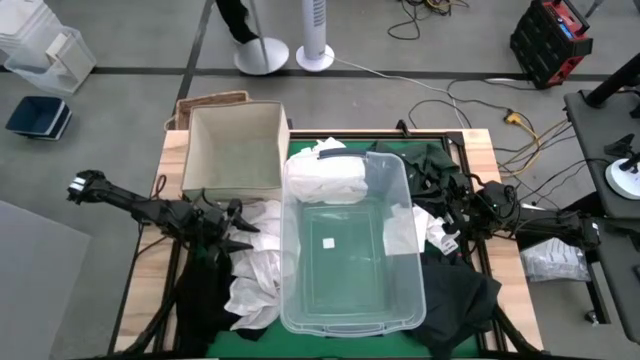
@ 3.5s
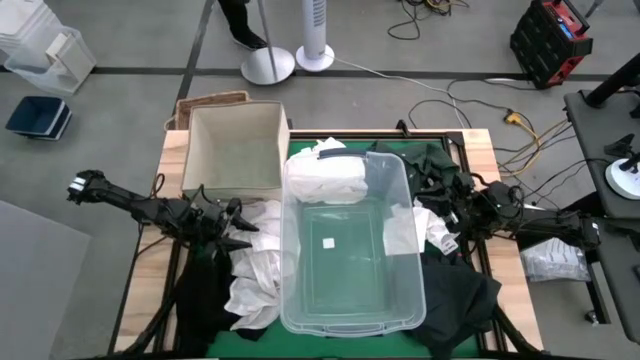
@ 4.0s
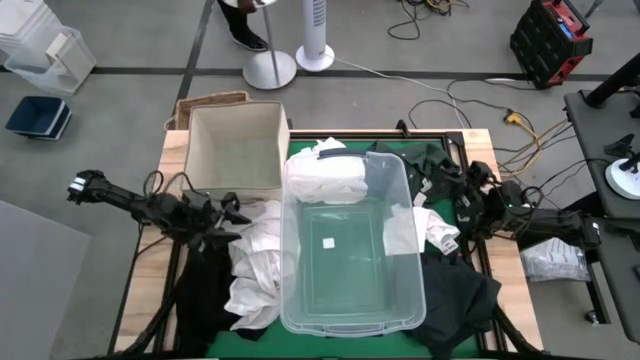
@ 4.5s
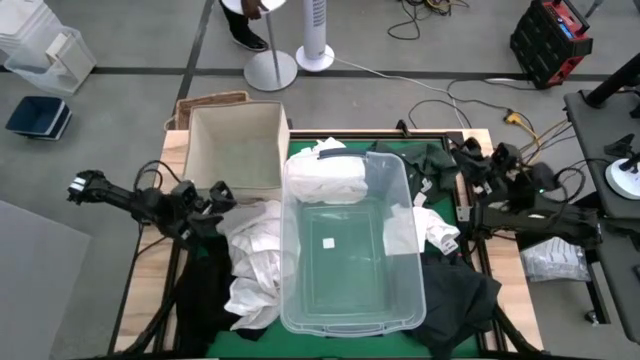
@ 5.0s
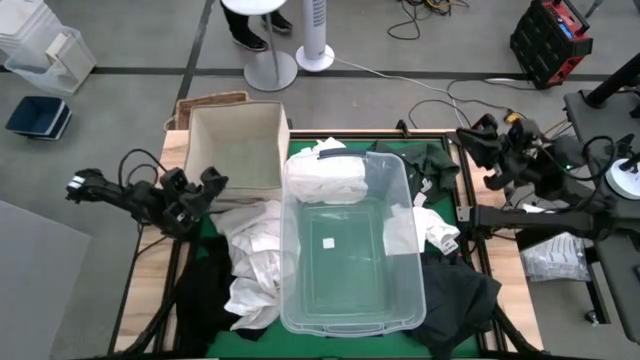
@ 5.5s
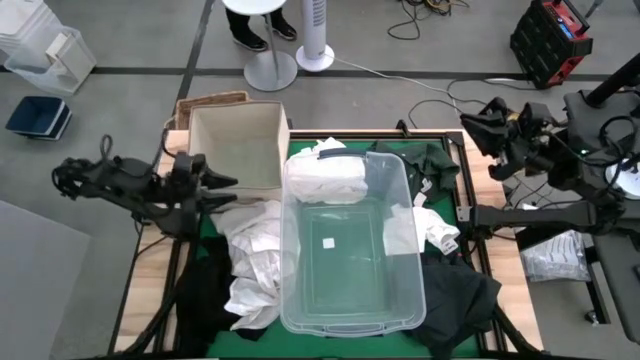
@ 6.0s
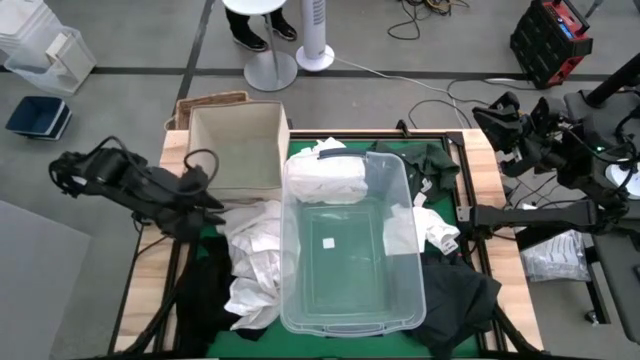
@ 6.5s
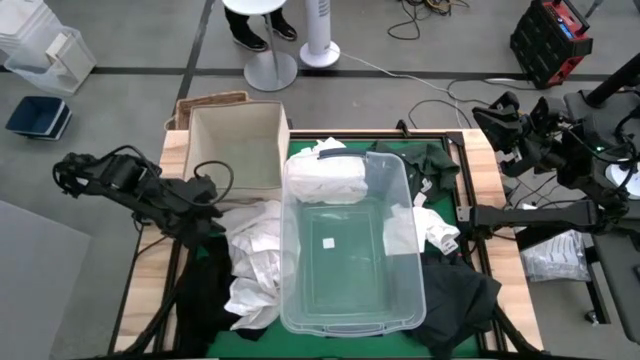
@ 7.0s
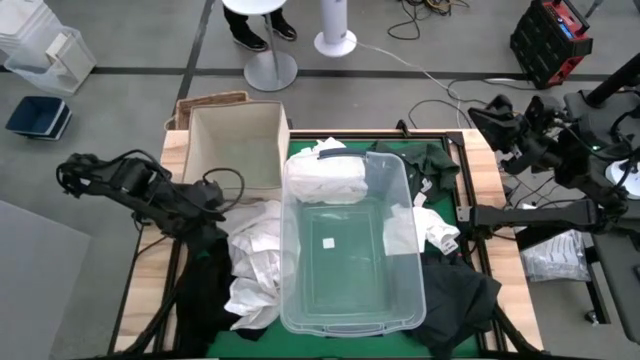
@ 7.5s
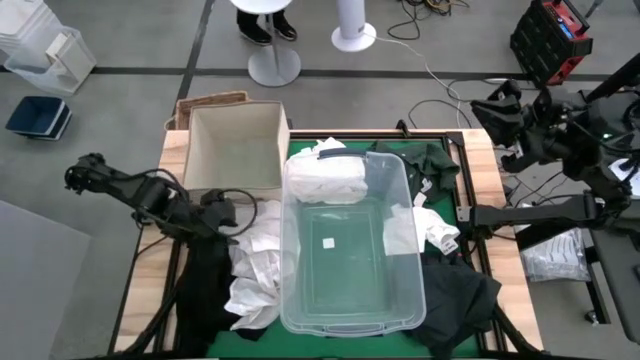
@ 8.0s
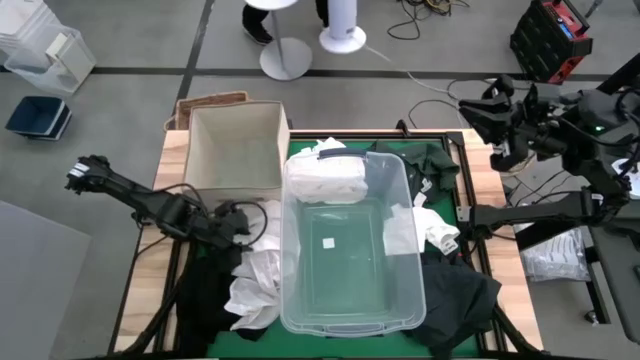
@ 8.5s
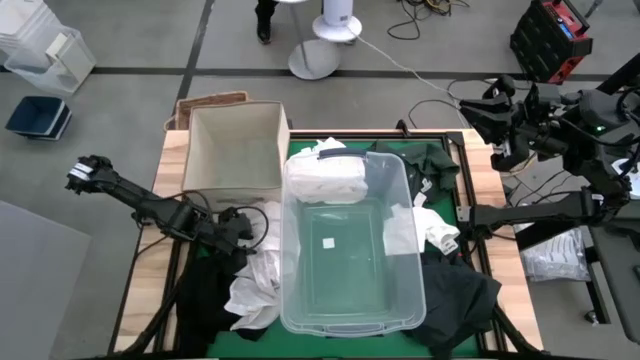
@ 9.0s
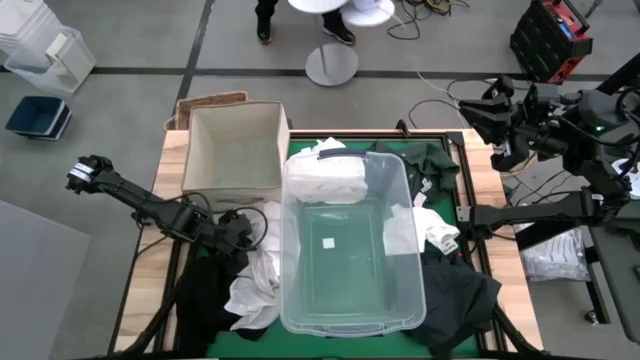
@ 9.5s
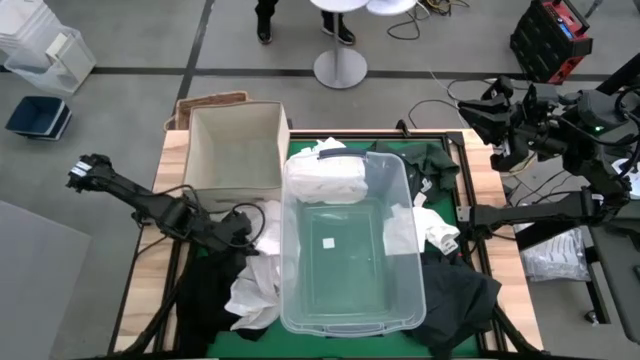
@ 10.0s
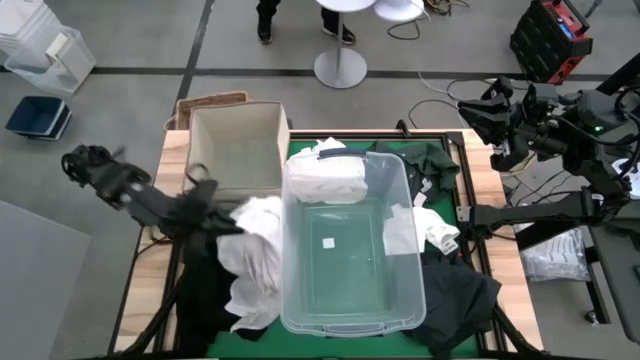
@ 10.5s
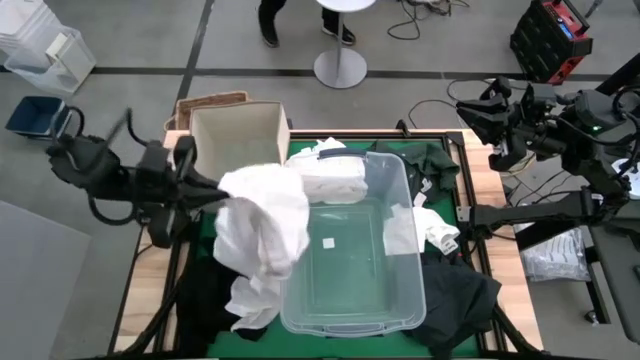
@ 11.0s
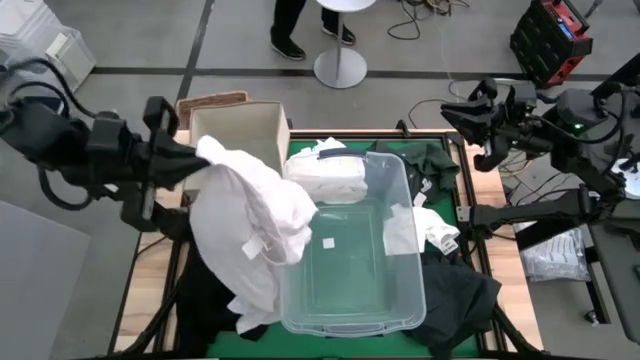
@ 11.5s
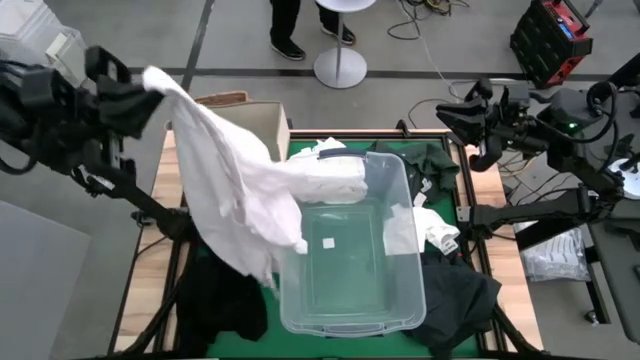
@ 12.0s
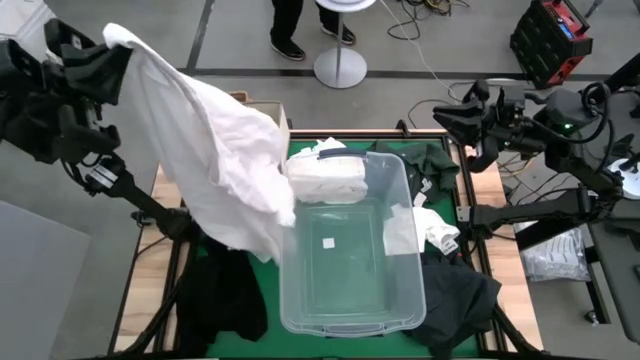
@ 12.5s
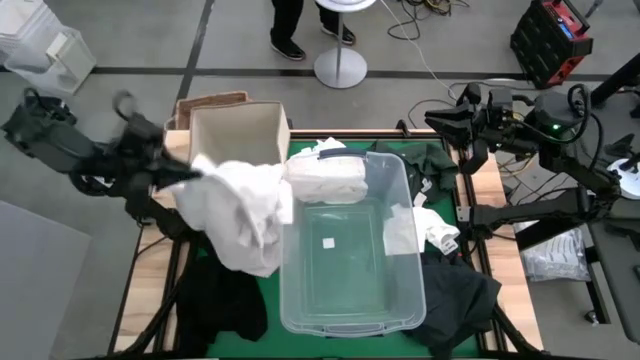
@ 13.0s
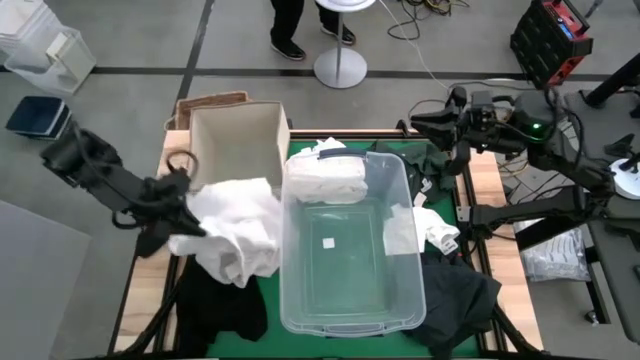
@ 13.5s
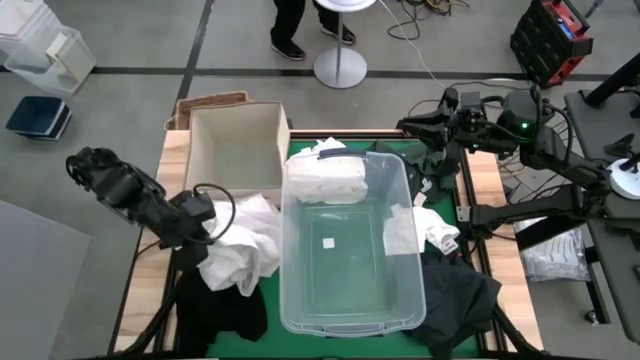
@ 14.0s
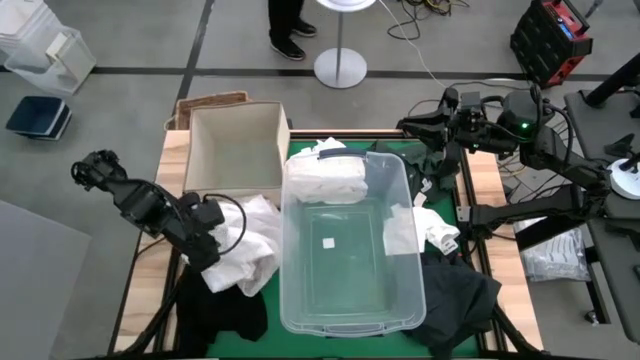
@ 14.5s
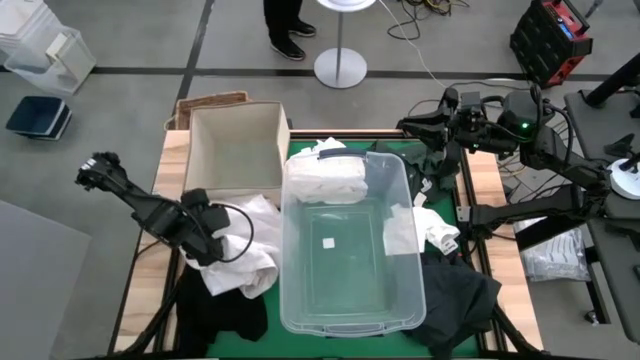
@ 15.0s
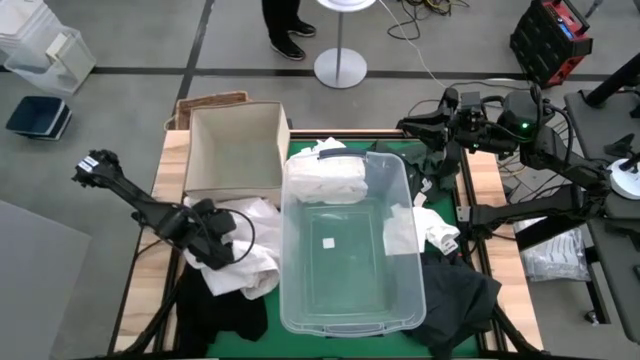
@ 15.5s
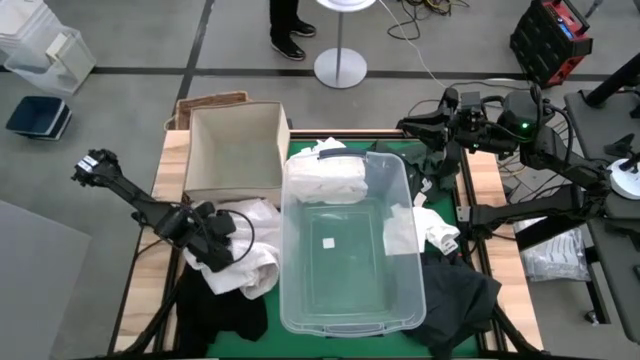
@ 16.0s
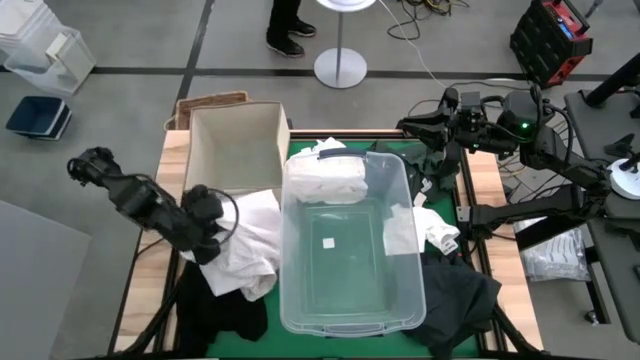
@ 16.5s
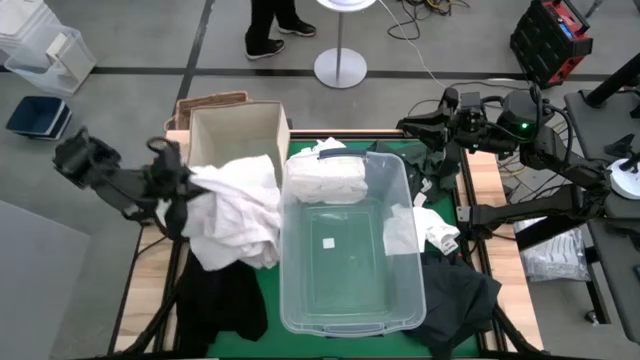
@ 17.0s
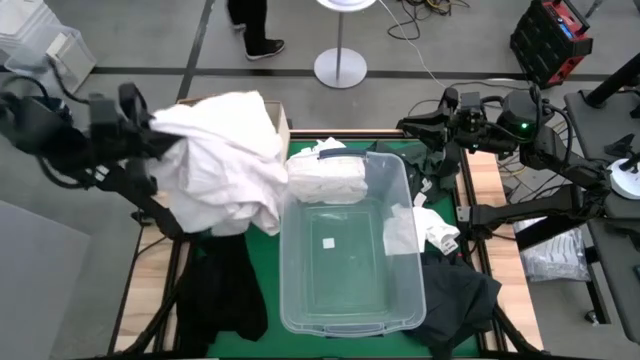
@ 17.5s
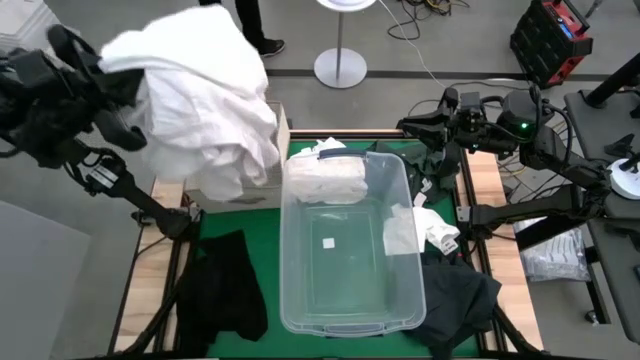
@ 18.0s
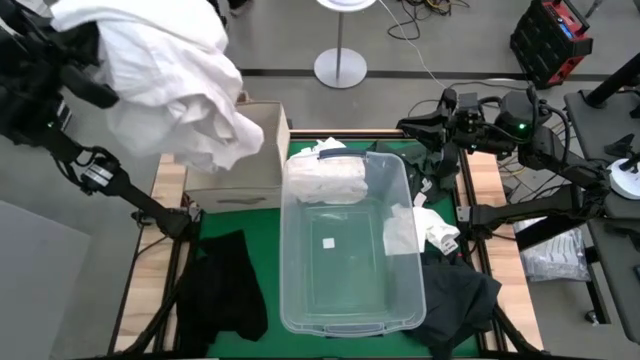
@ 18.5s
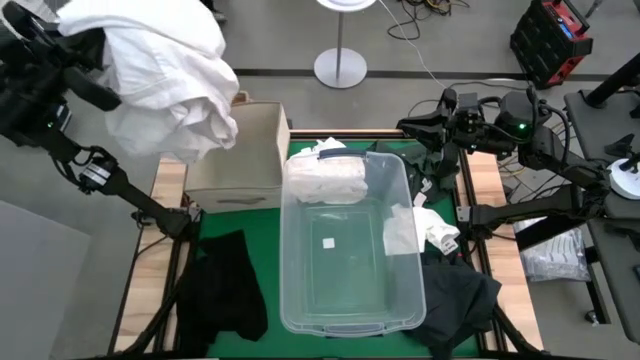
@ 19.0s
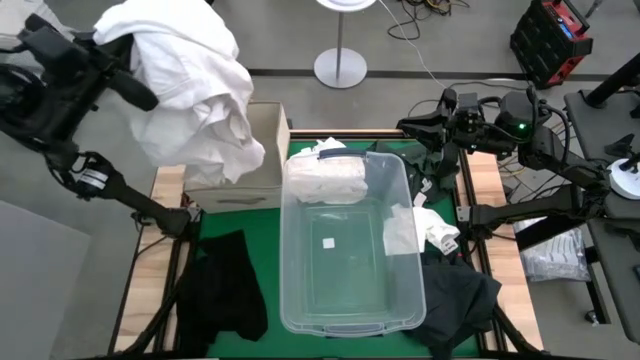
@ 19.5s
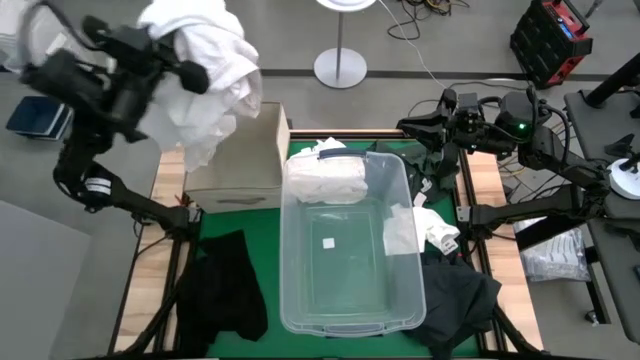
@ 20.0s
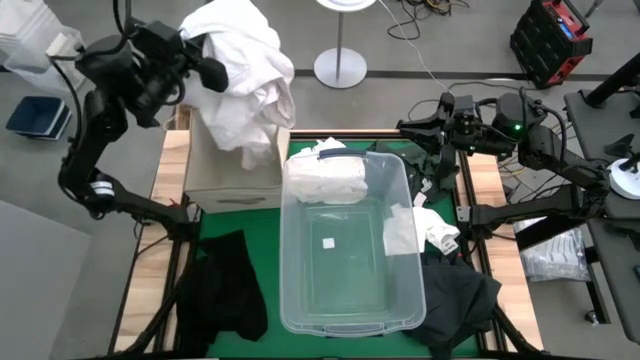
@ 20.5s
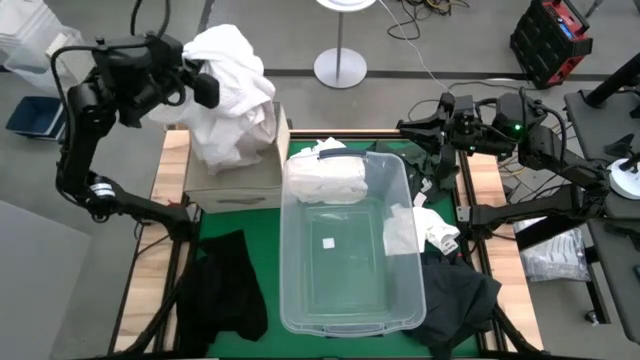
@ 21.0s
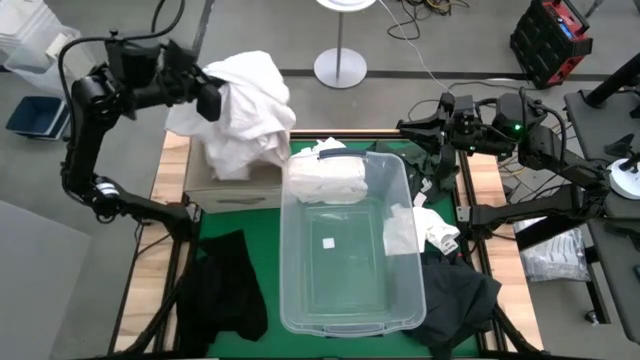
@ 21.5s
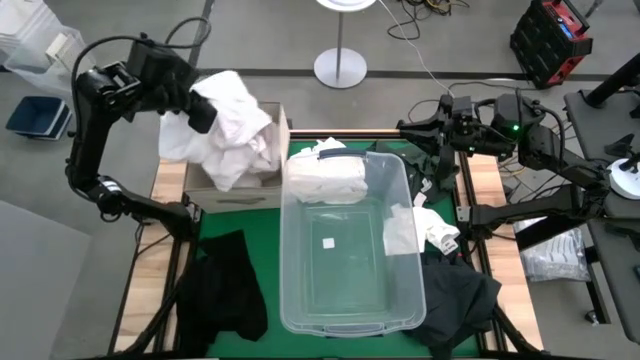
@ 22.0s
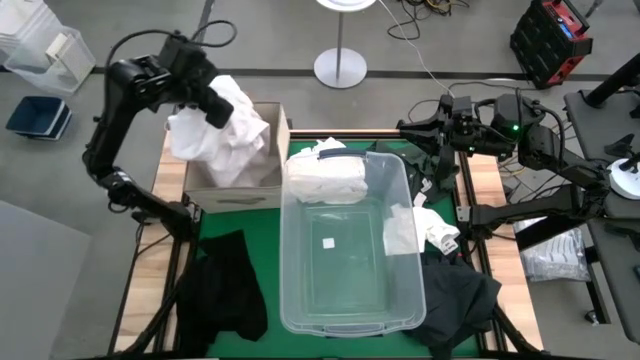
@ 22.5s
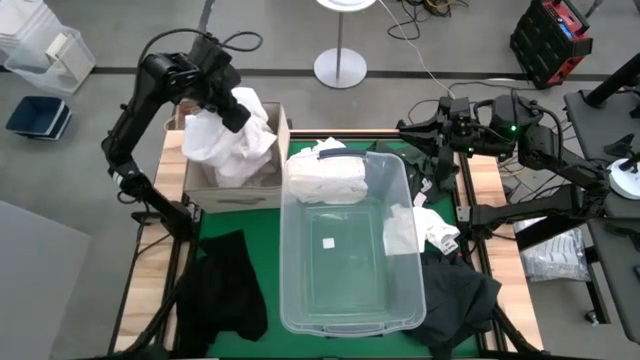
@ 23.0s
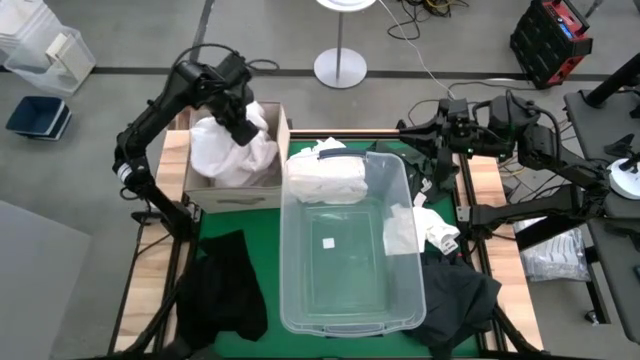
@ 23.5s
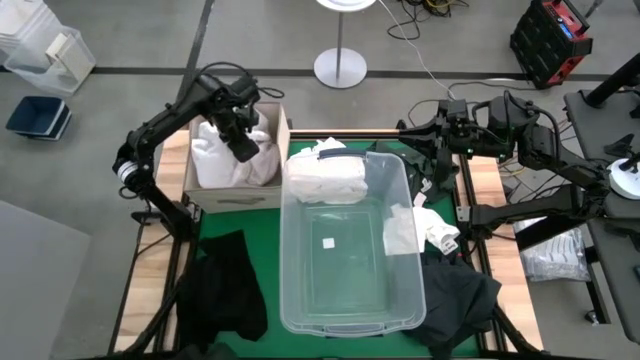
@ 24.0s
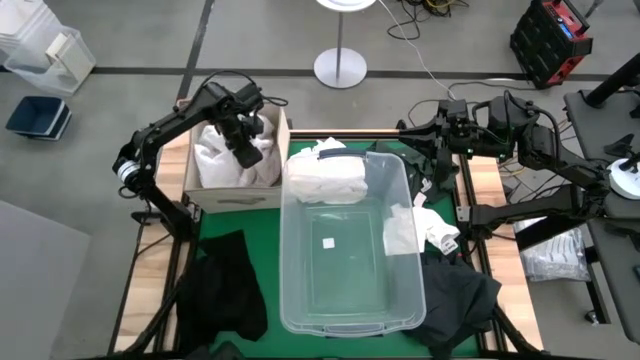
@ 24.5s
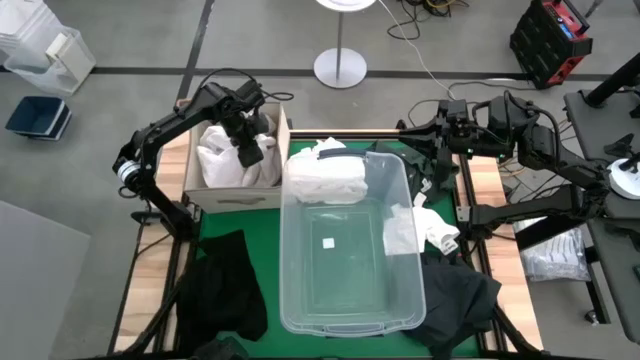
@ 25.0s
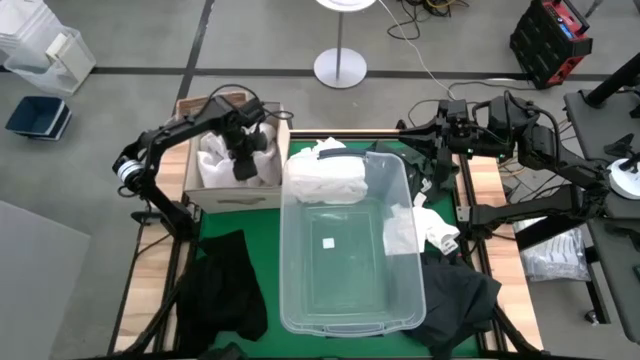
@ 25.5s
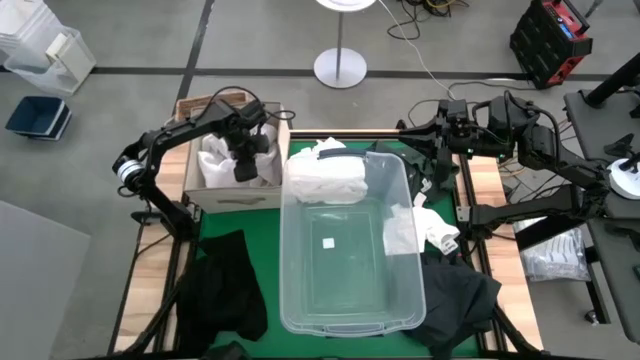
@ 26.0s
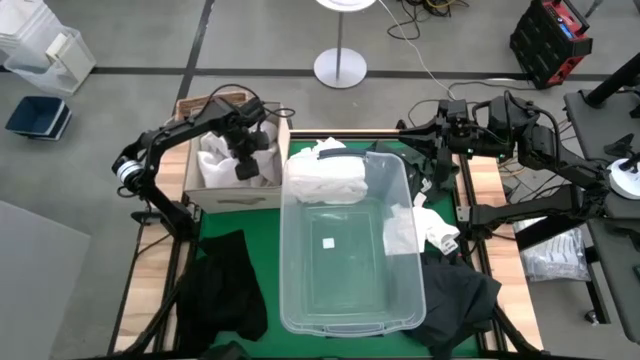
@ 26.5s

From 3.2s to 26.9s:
Task: Sort clothes
Put the white shirt into the white laundry organizer
